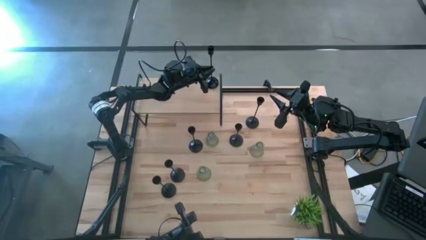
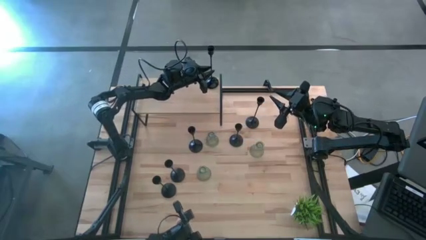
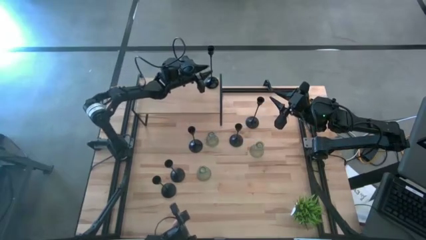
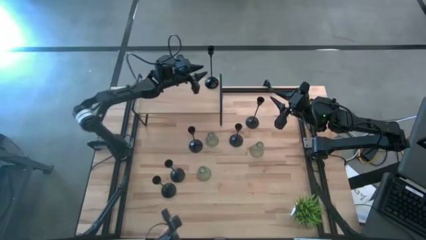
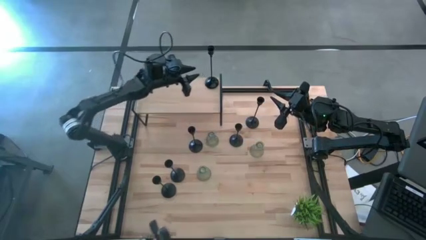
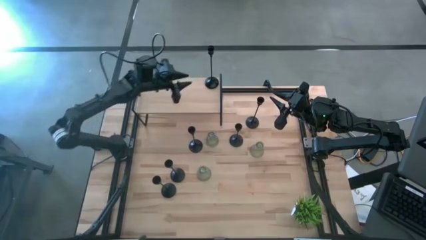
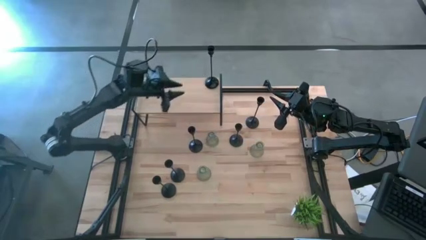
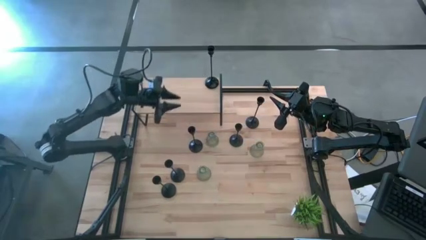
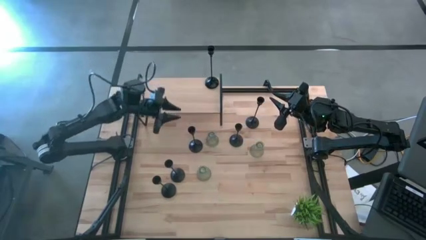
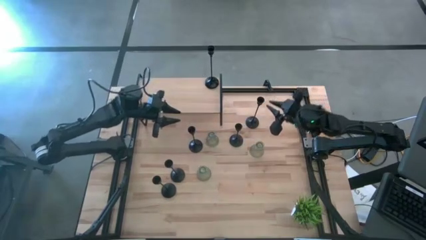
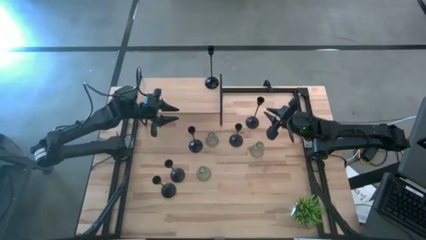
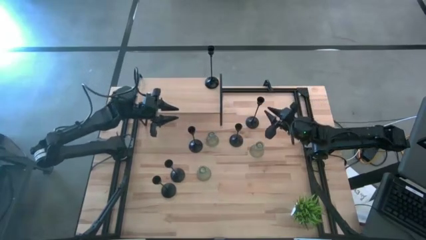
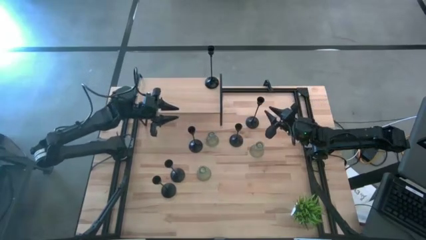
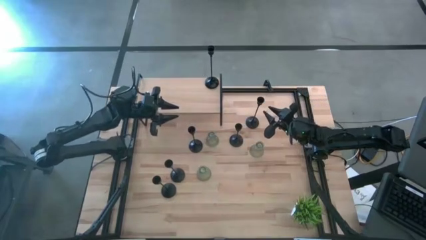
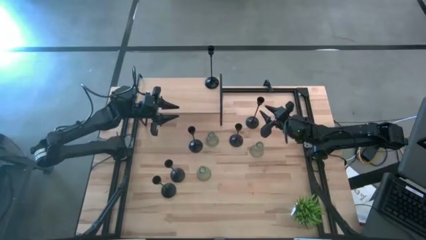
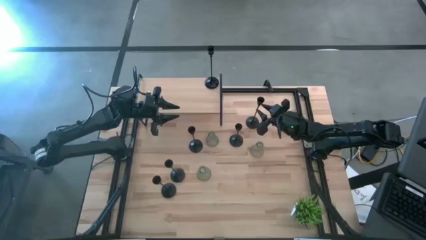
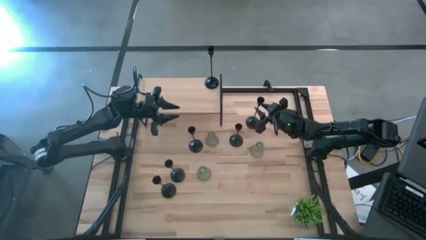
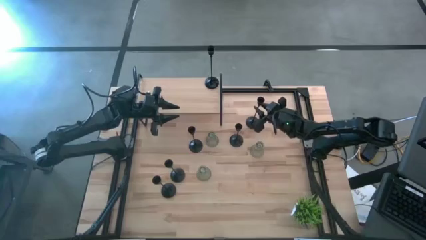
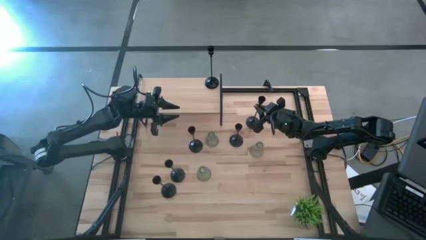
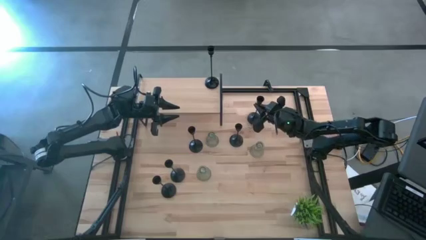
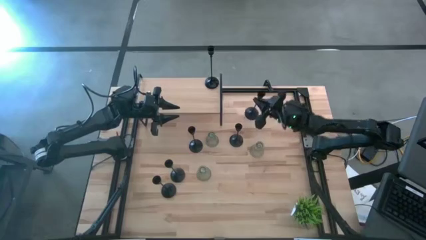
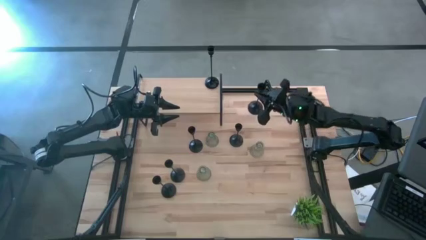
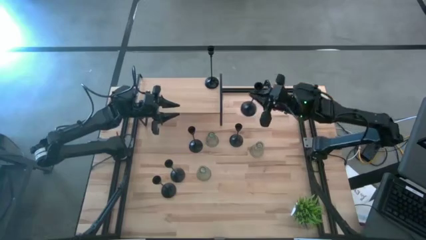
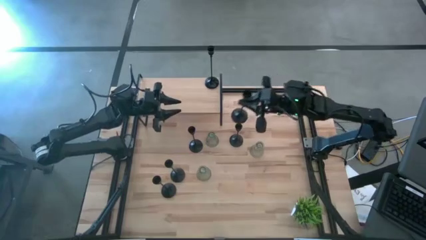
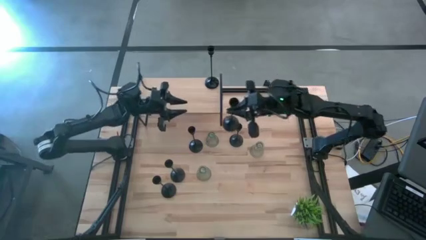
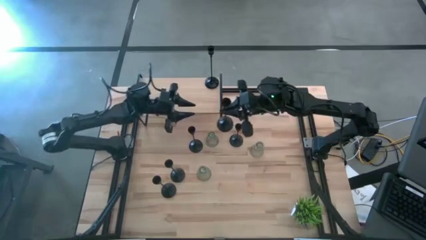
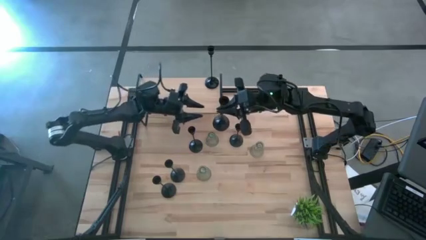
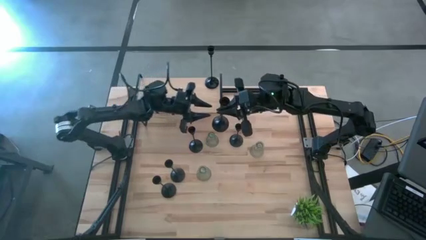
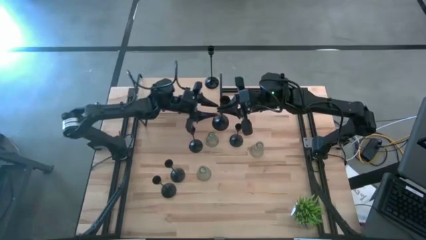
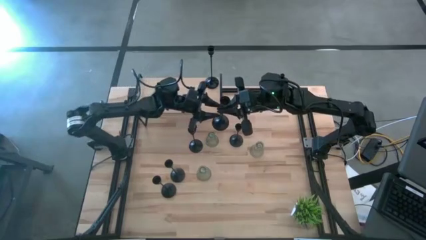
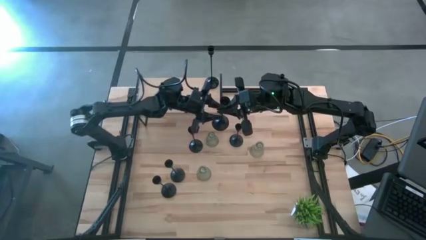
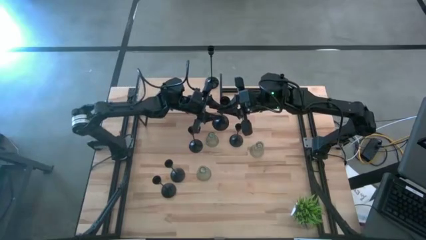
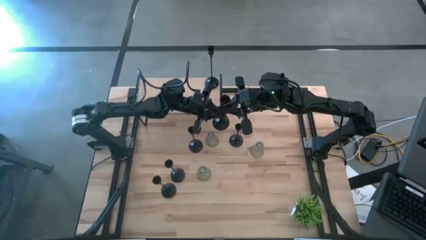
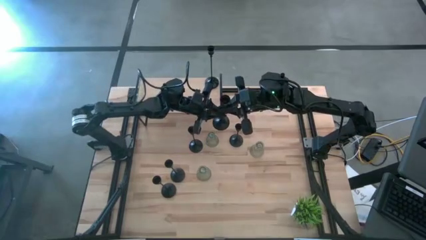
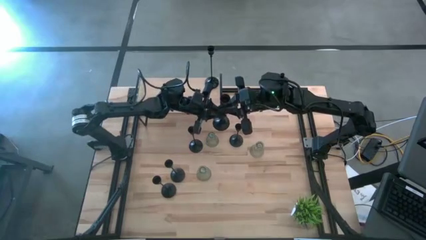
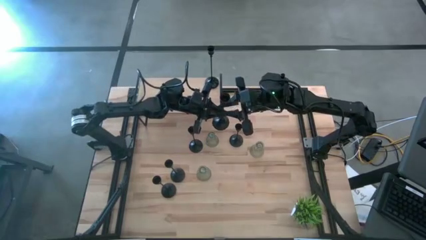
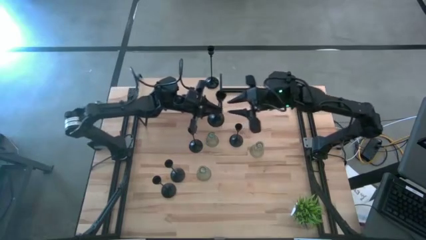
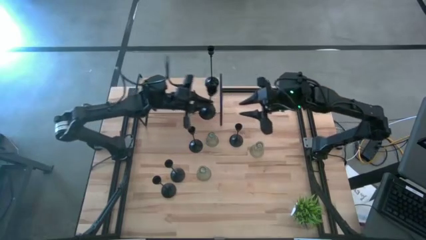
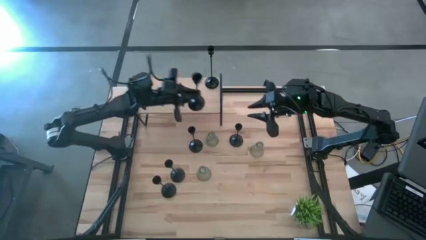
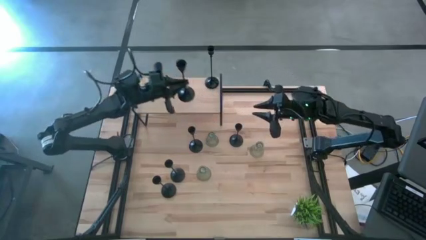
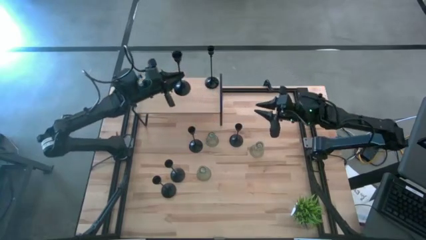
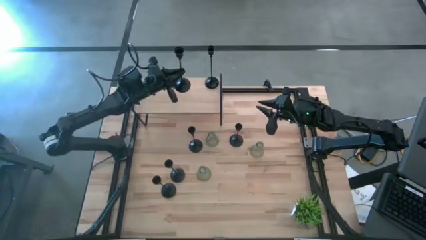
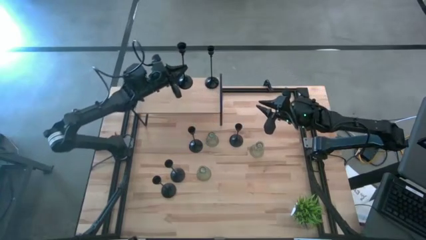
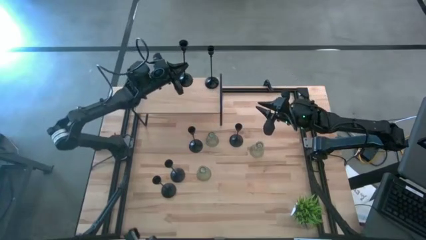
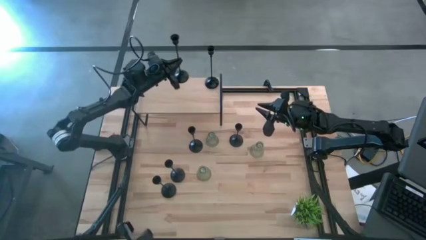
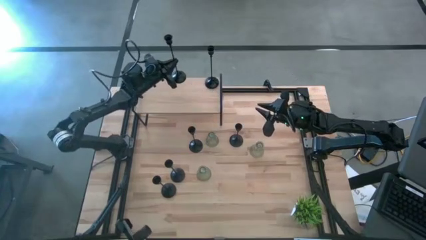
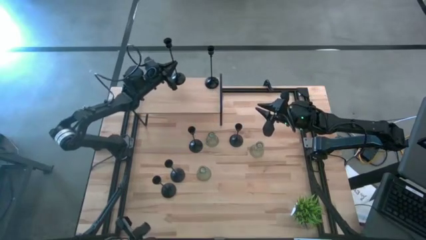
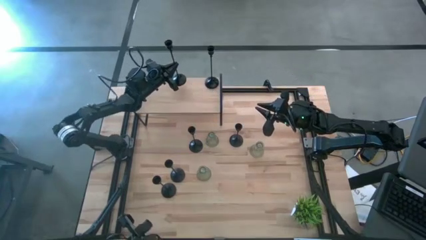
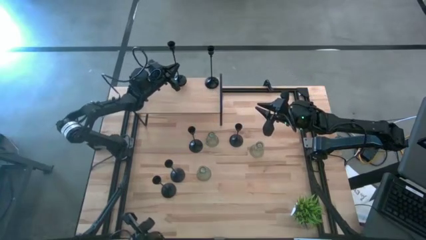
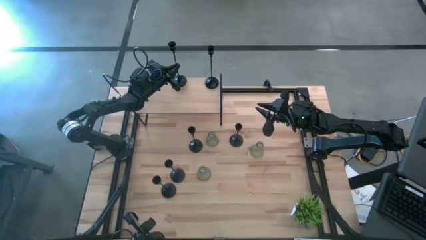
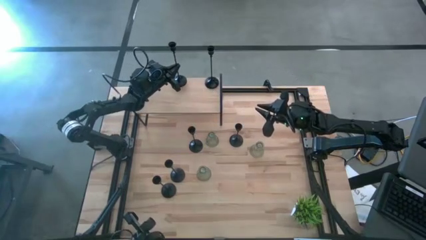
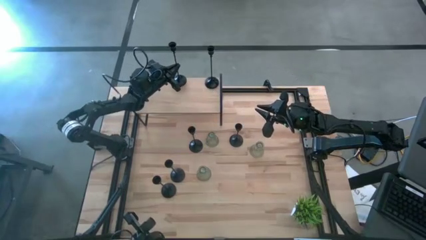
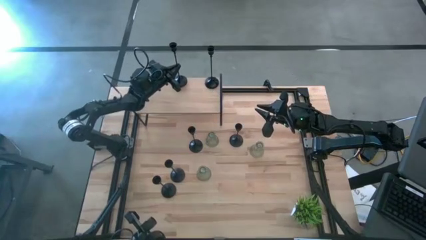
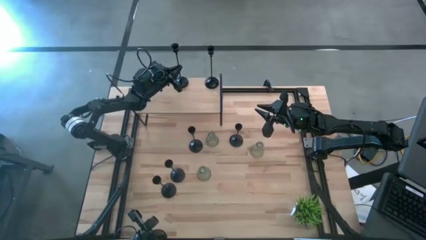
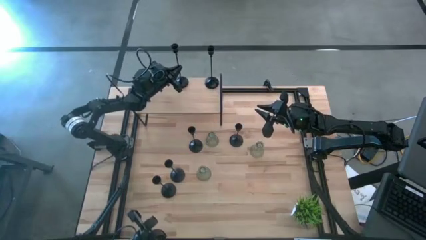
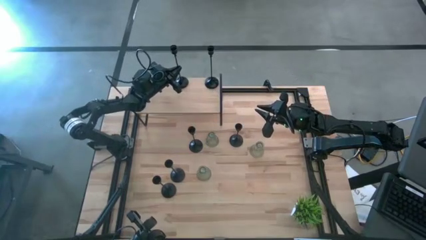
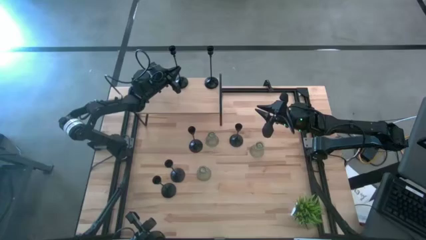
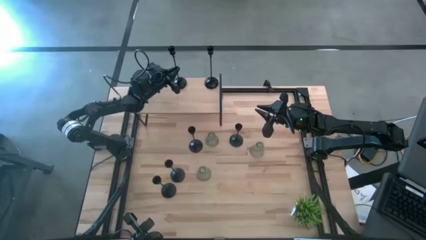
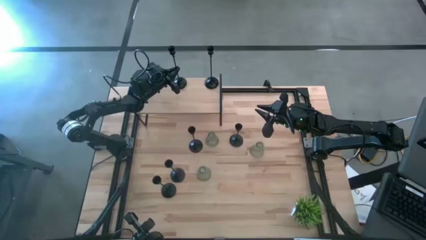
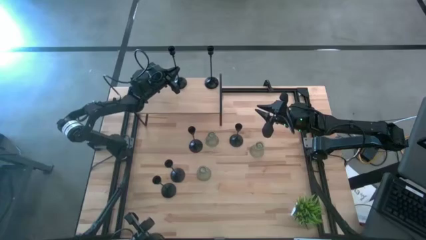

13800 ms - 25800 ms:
Task: Pick & Place candle stick holders
Put the large black candle holder on the shelf
